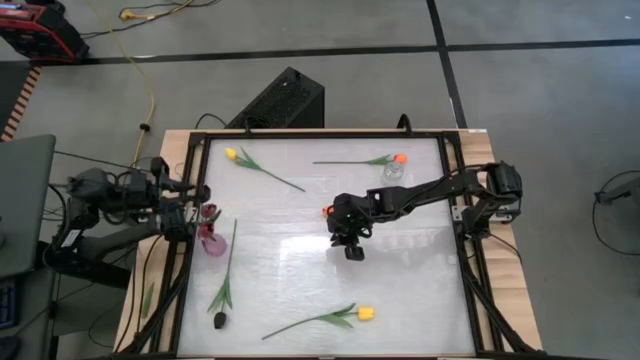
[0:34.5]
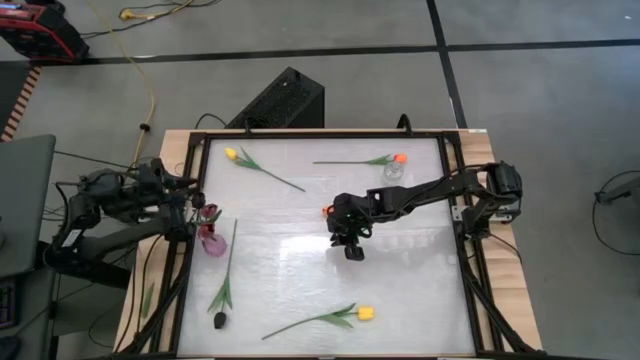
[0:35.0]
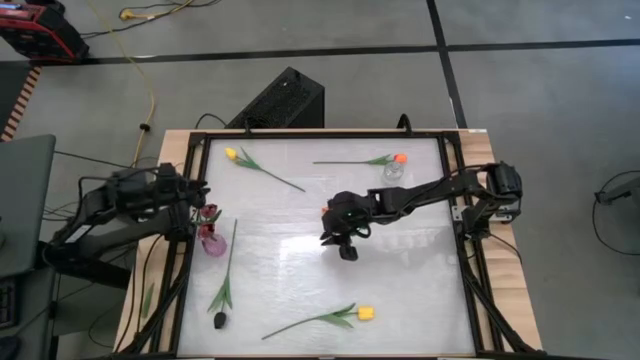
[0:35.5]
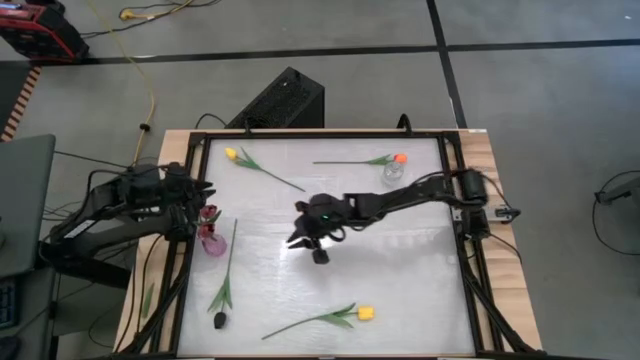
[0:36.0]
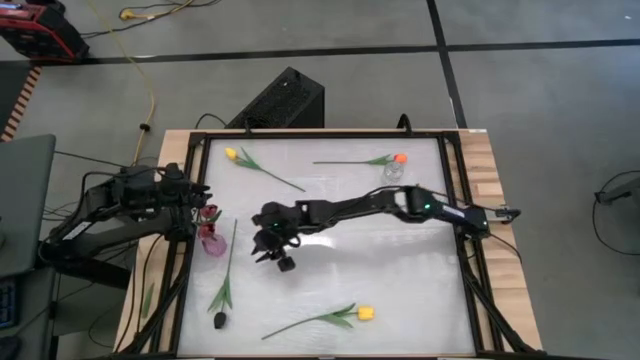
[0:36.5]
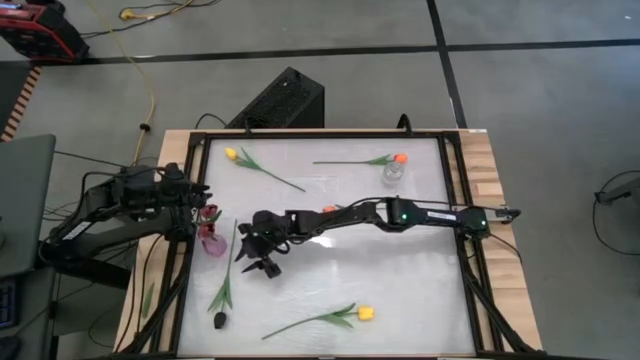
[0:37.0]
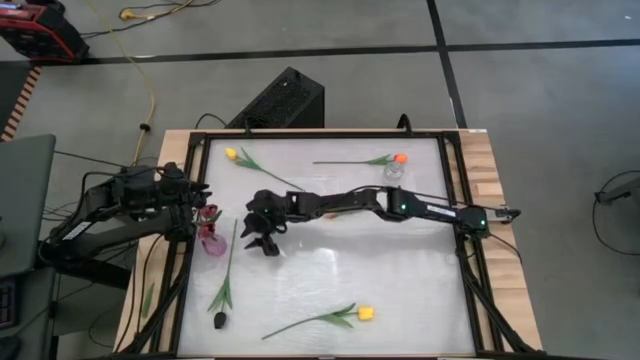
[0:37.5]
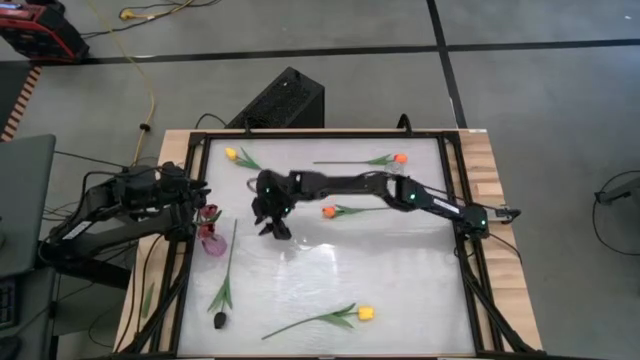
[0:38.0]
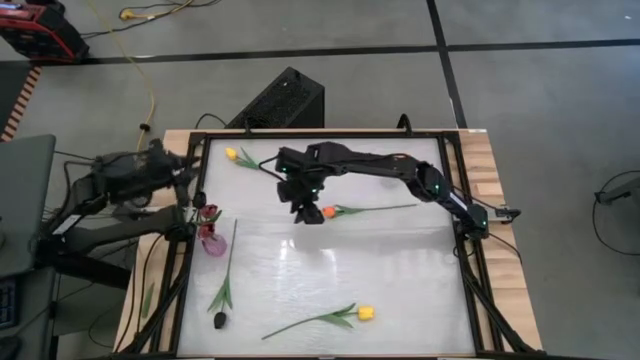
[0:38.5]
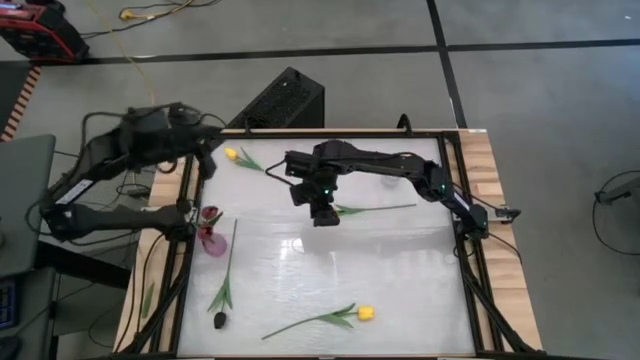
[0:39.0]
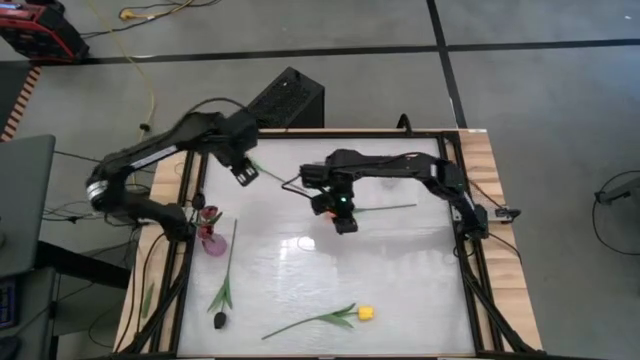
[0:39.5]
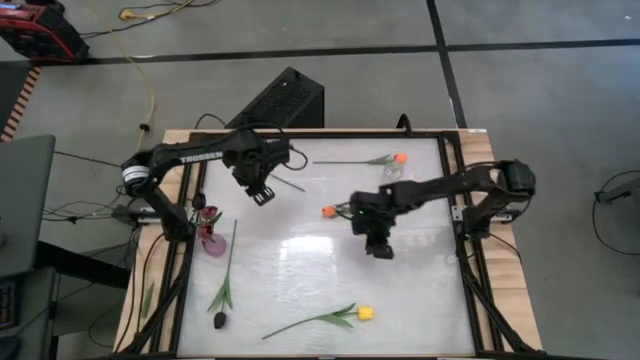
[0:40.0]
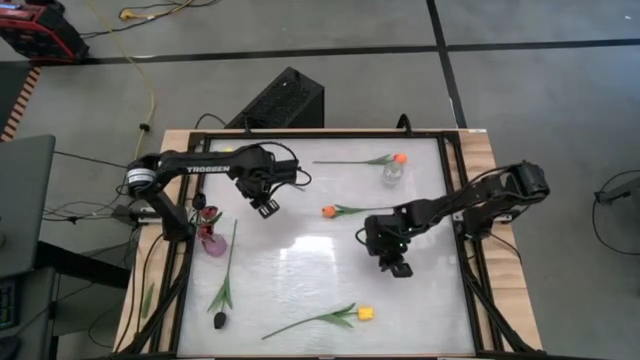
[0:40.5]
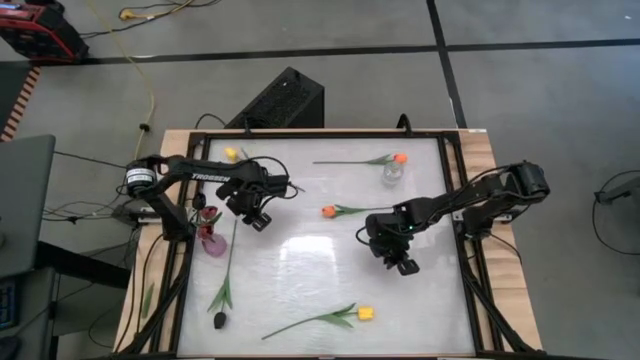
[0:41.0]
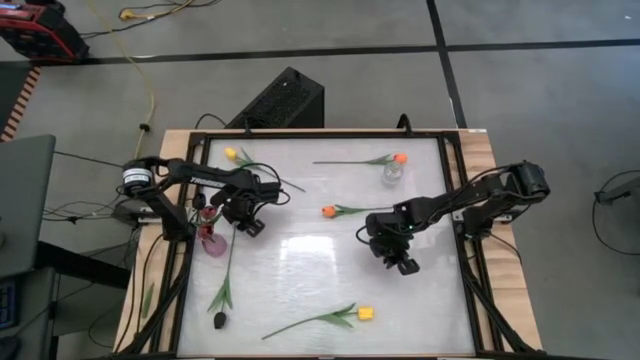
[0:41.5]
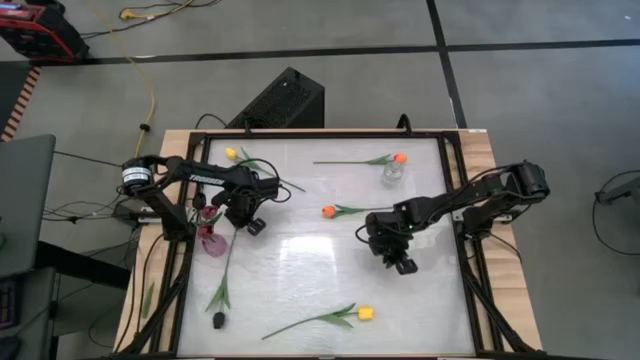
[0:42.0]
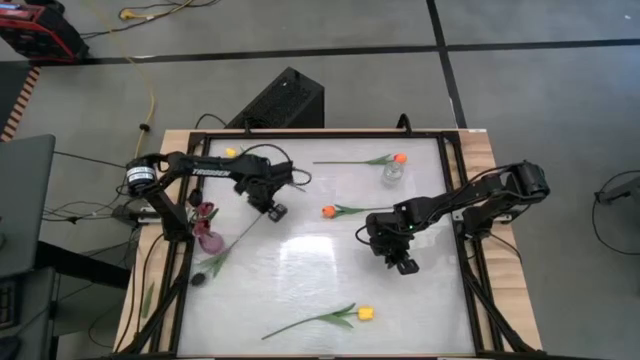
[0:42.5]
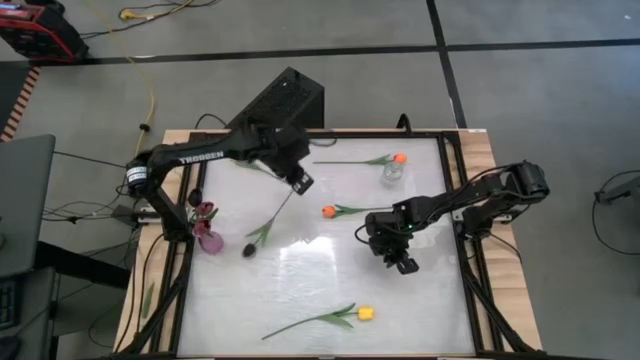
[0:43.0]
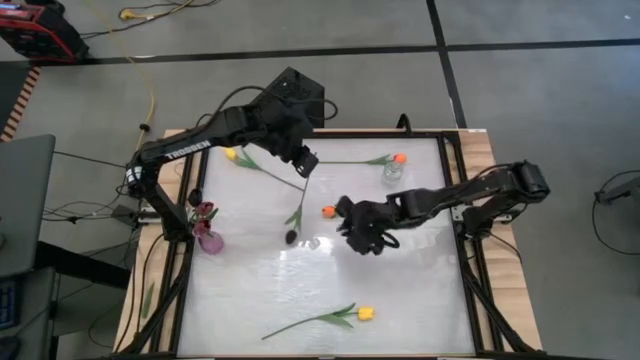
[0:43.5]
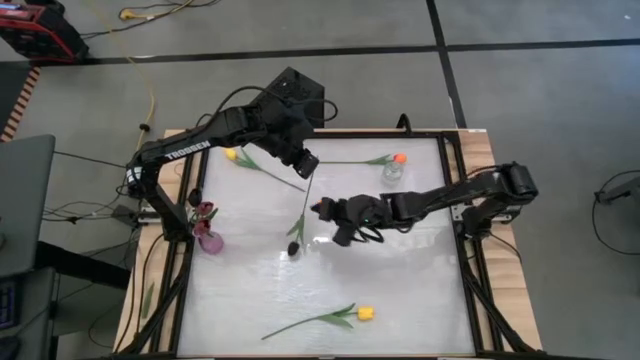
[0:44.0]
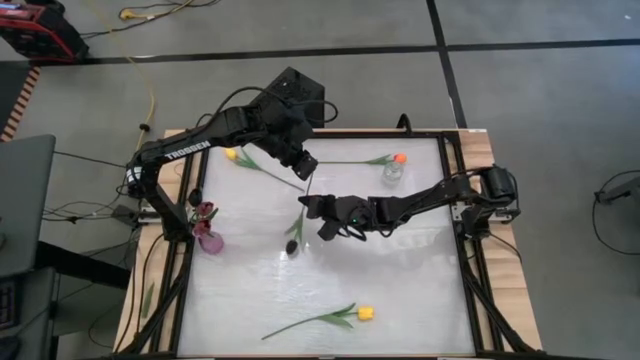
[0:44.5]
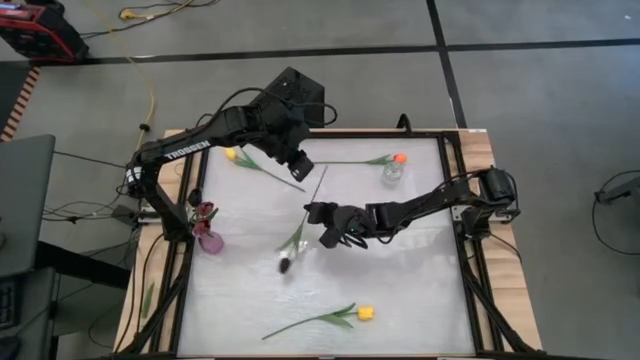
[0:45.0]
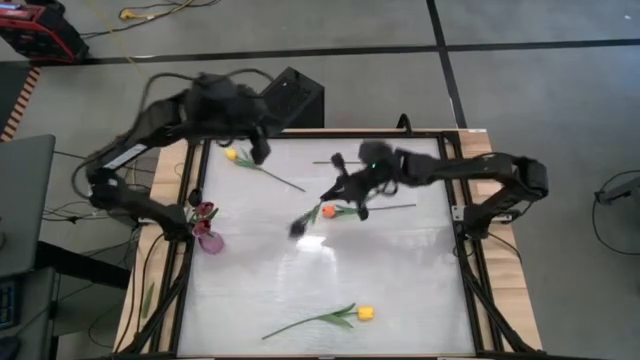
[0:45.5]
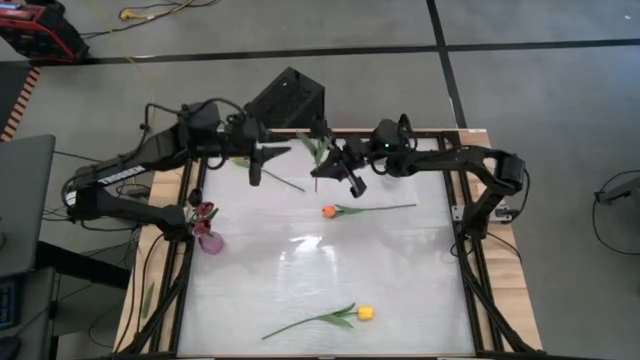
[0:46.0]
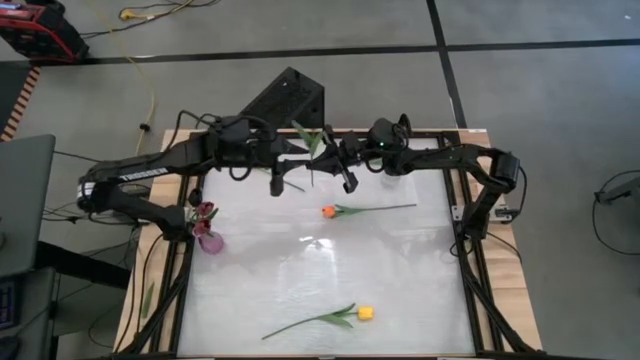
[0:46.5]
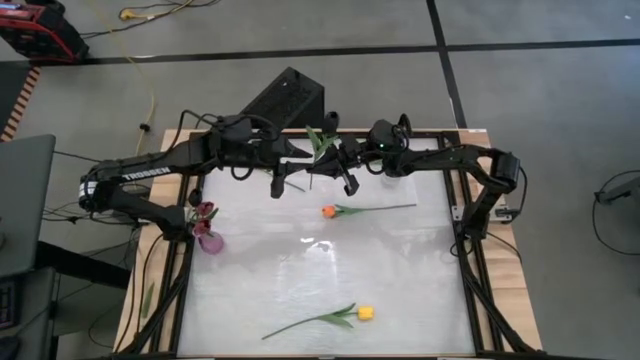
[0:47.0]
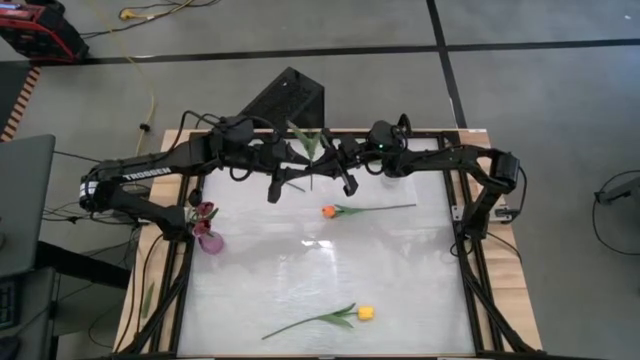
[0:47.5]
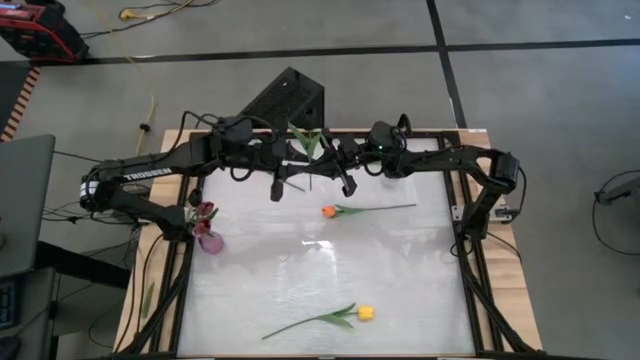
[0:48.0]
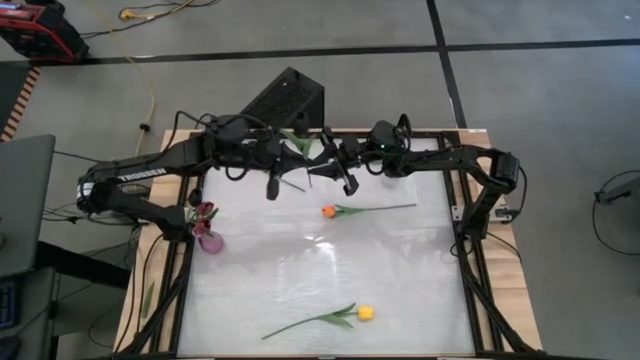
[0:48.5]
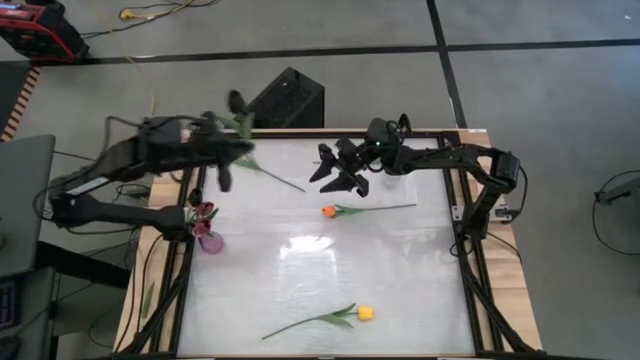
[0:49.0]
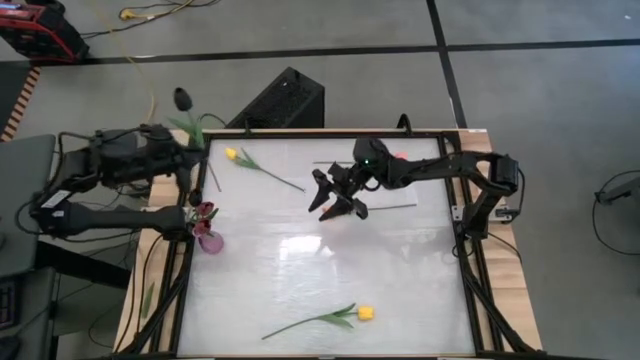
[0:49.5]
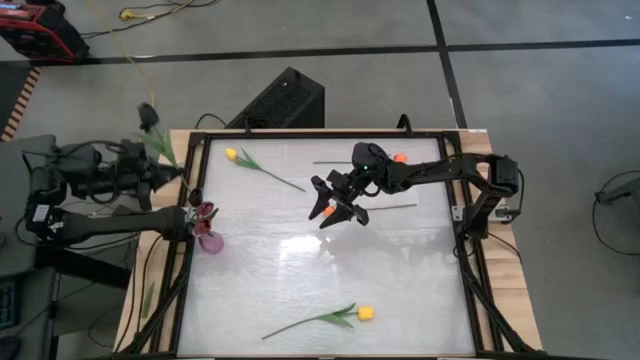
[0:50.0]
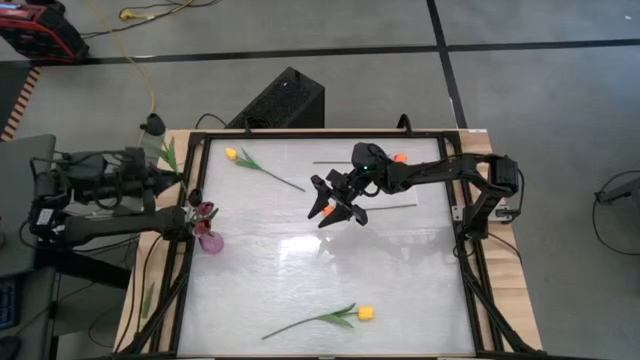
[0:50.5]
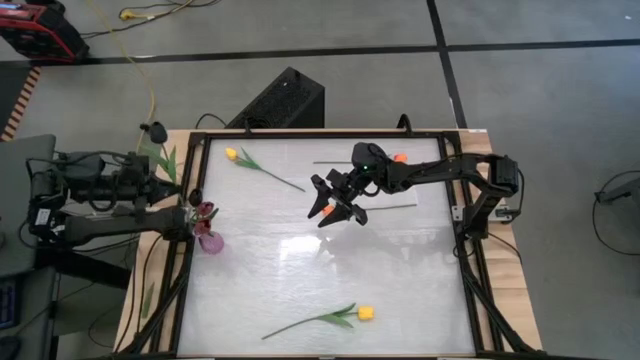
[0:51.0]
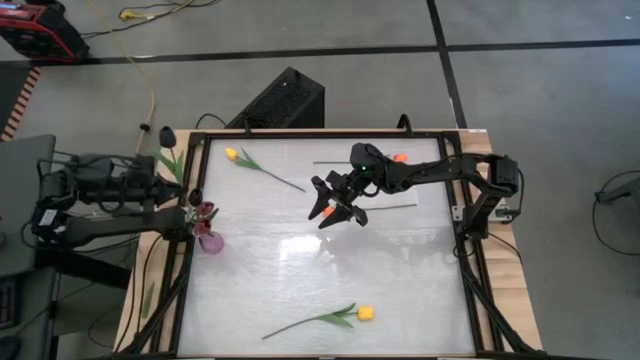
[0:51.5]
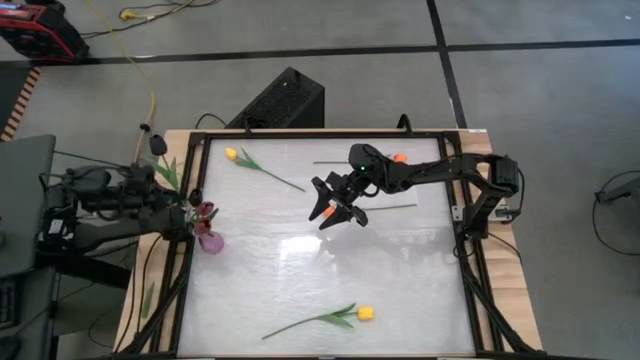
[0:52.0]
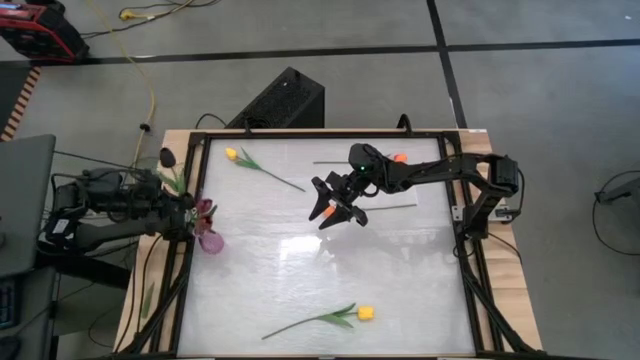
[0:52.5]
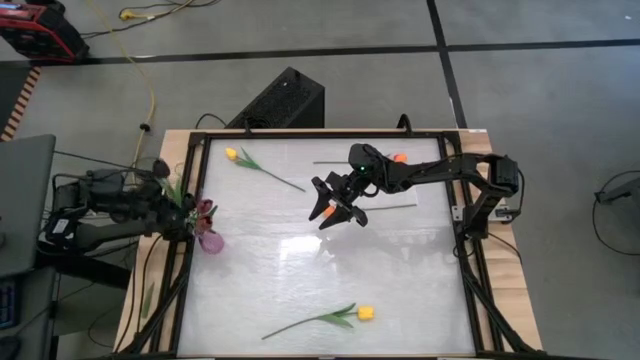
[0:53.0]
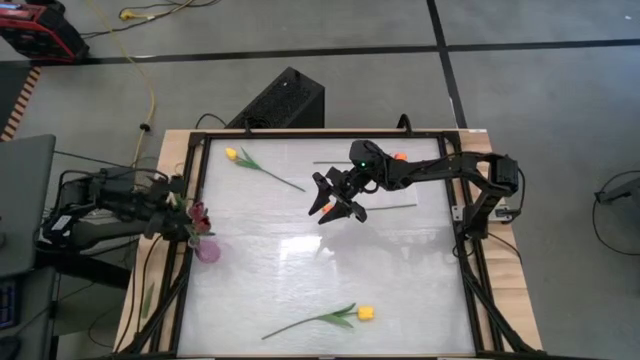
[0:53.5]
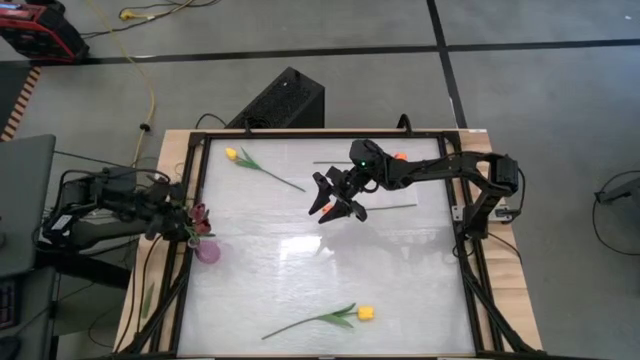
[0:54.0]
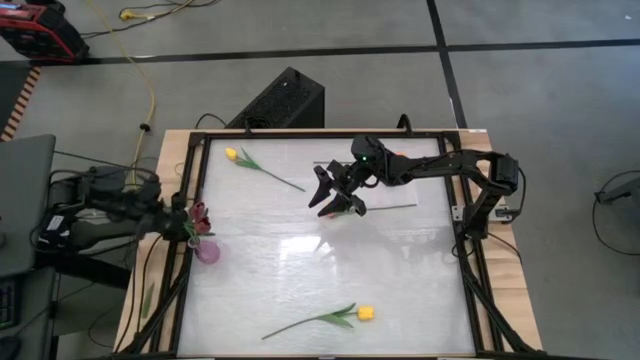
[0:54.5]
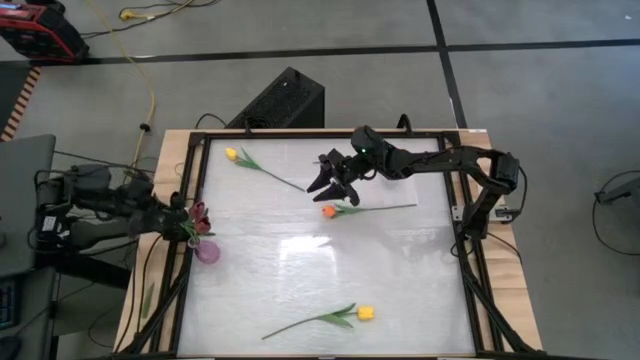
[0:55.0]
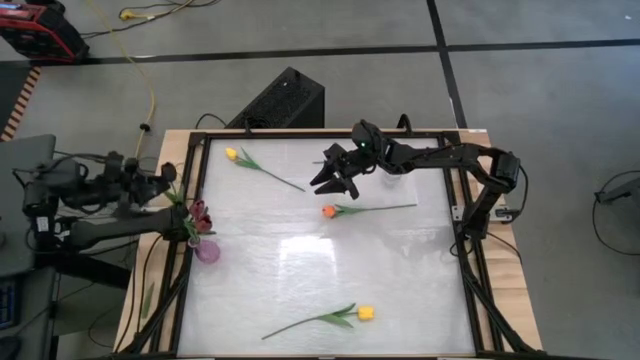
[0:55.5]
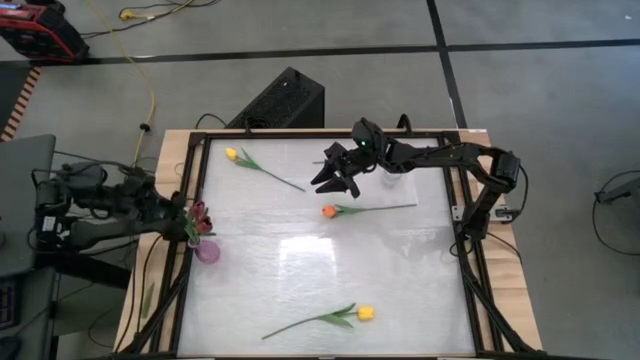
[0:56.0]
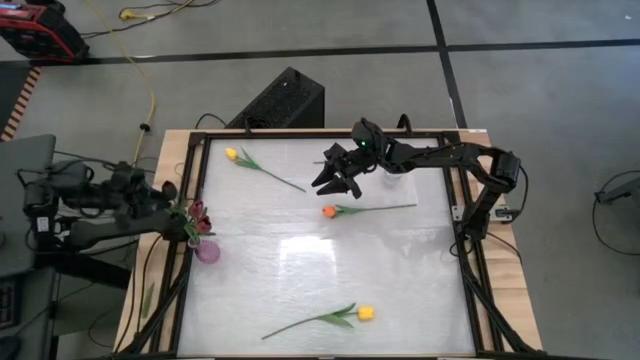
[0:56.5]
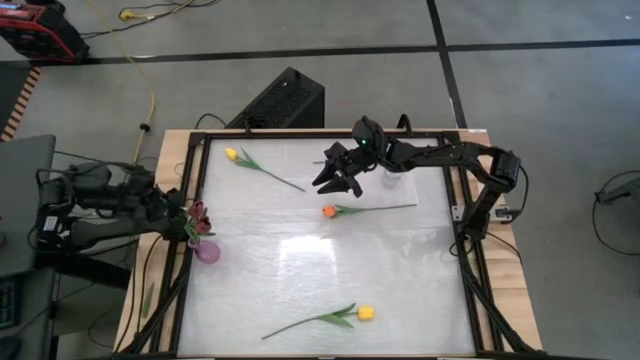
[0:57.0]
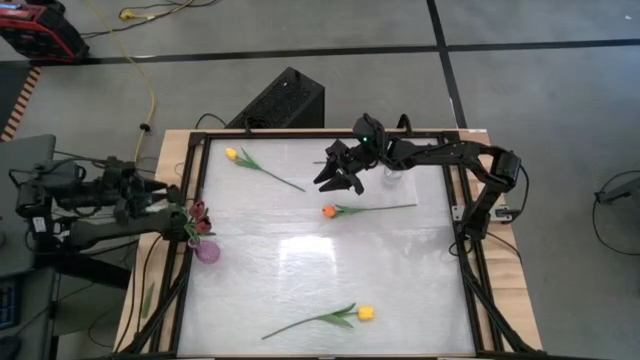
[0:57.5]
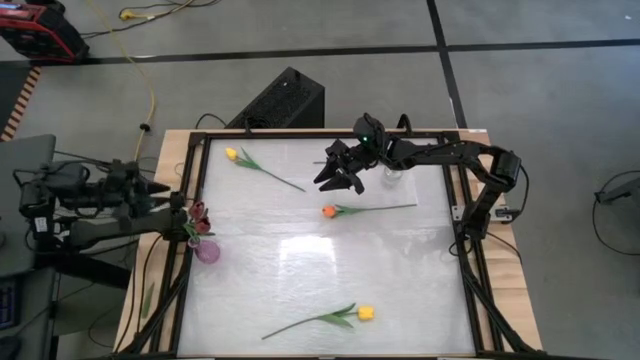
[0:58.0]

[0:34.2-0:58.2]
Task: Sort flowers into vase by color
Put the black tulip into the pink vase
